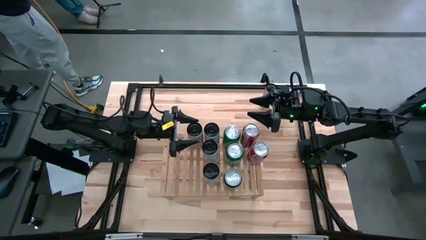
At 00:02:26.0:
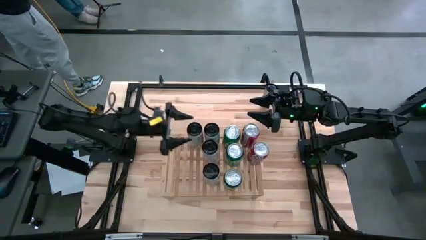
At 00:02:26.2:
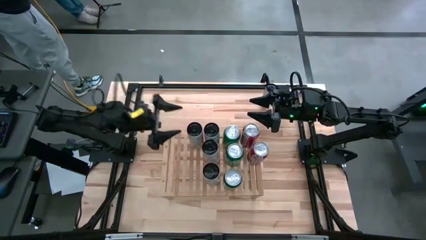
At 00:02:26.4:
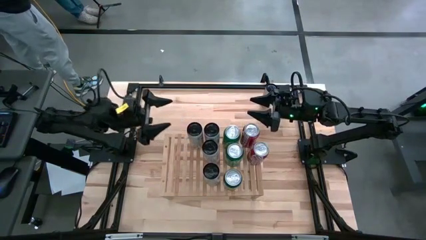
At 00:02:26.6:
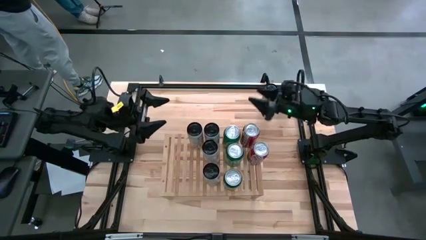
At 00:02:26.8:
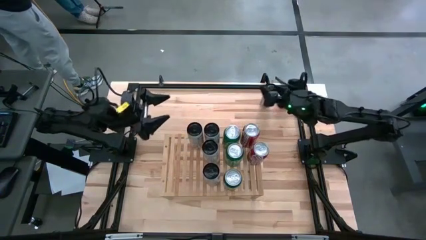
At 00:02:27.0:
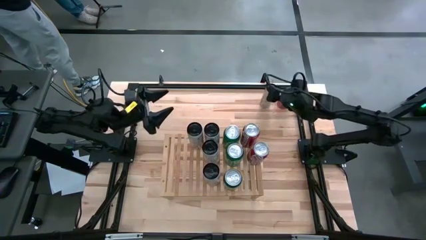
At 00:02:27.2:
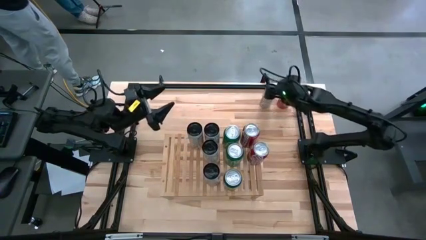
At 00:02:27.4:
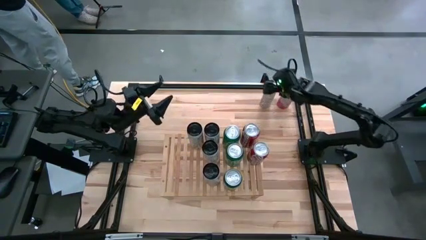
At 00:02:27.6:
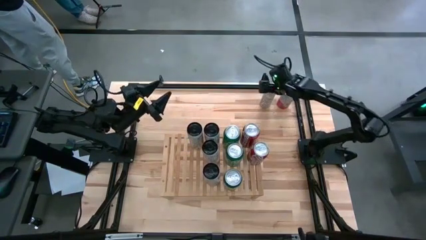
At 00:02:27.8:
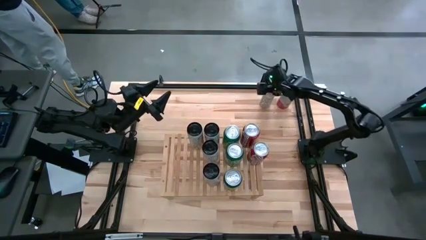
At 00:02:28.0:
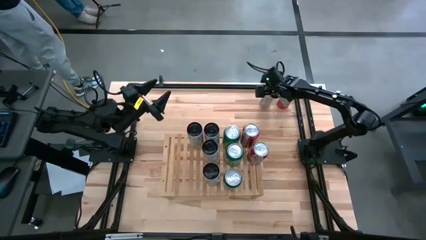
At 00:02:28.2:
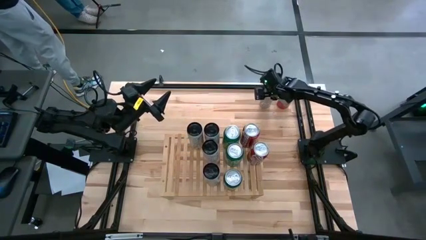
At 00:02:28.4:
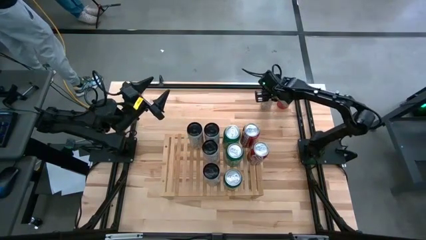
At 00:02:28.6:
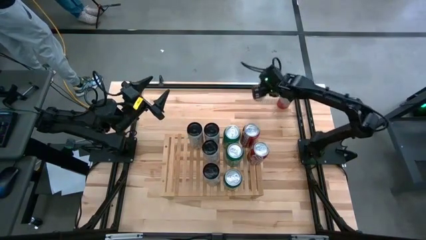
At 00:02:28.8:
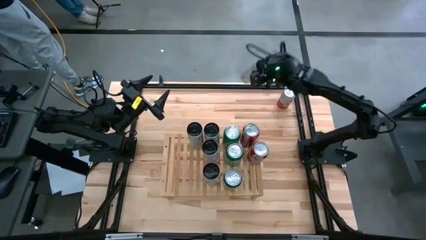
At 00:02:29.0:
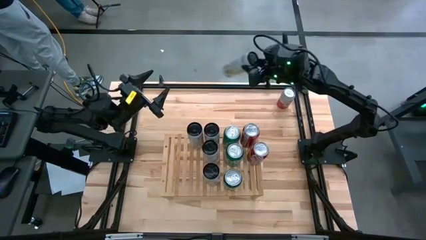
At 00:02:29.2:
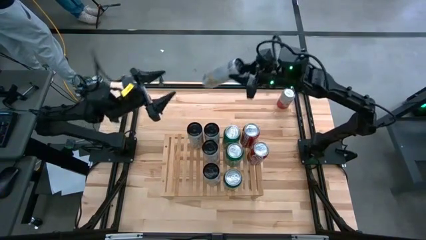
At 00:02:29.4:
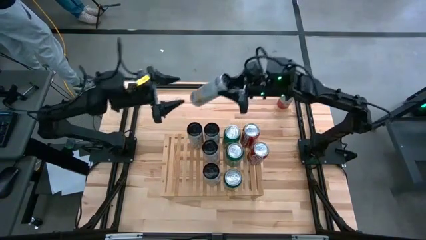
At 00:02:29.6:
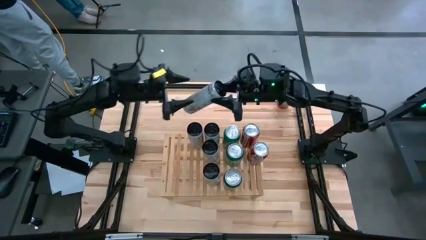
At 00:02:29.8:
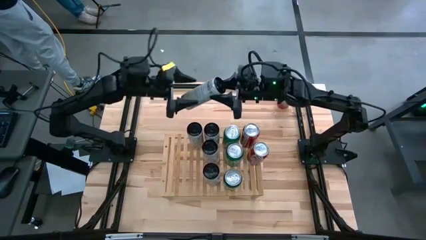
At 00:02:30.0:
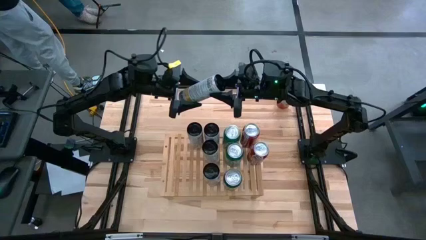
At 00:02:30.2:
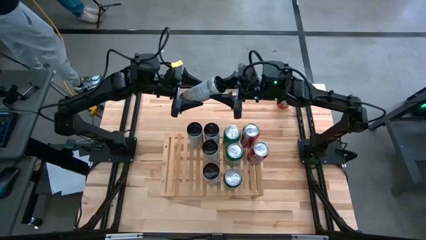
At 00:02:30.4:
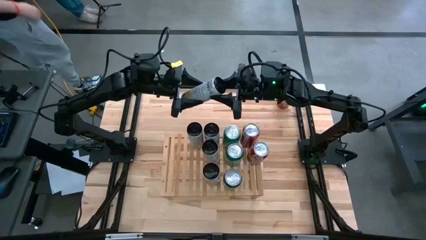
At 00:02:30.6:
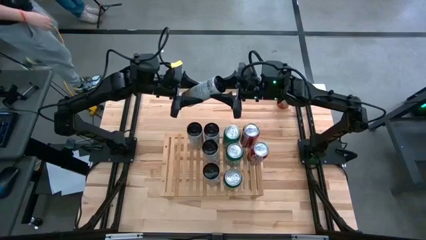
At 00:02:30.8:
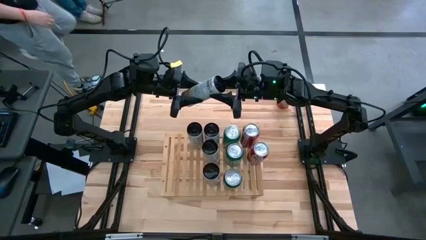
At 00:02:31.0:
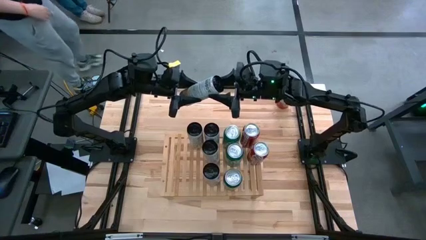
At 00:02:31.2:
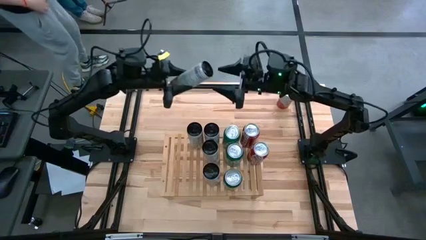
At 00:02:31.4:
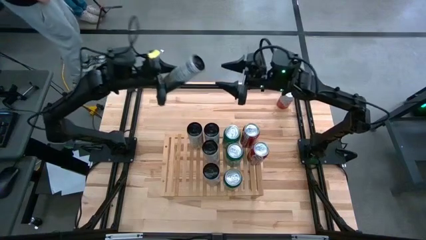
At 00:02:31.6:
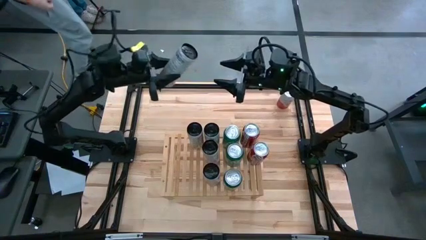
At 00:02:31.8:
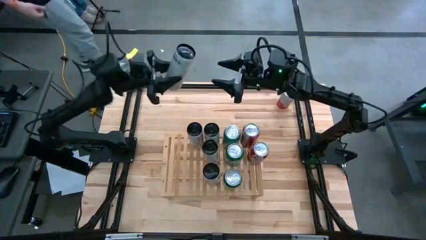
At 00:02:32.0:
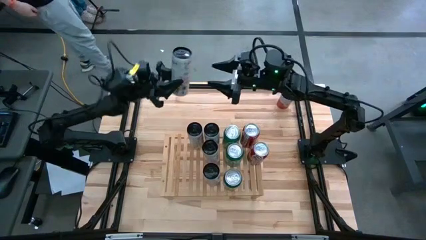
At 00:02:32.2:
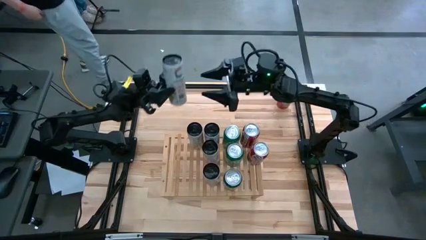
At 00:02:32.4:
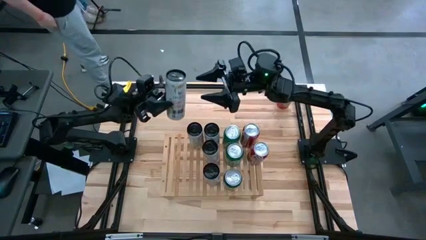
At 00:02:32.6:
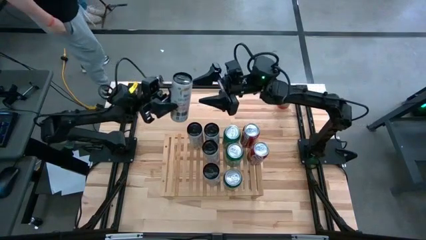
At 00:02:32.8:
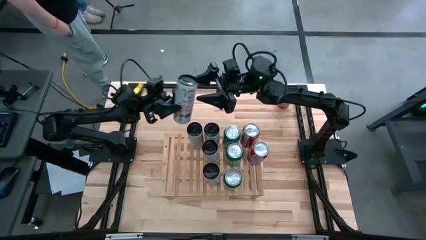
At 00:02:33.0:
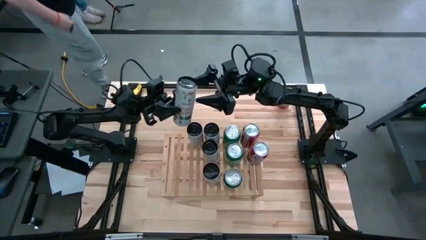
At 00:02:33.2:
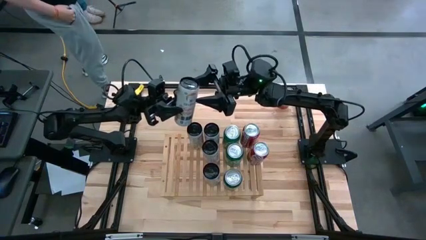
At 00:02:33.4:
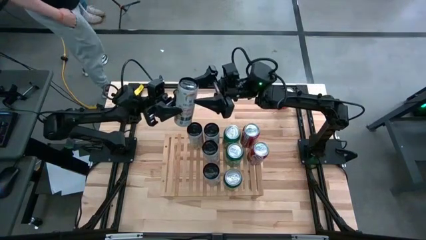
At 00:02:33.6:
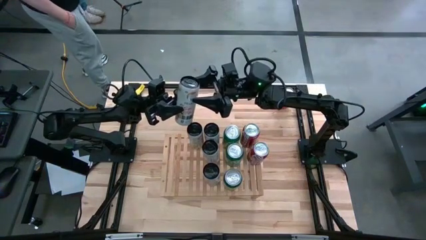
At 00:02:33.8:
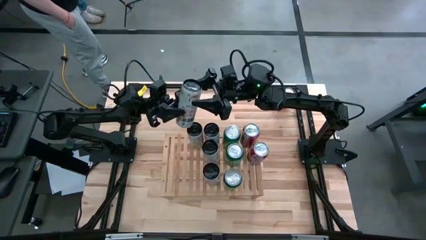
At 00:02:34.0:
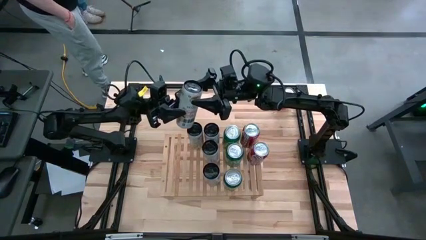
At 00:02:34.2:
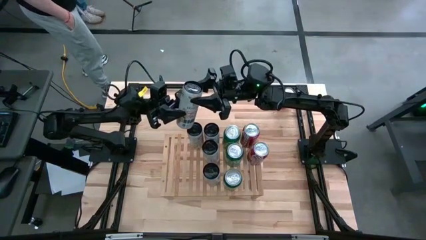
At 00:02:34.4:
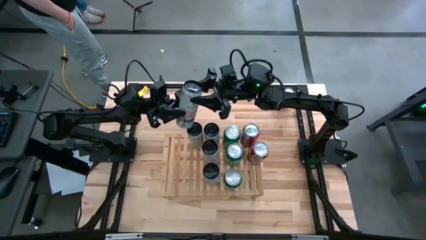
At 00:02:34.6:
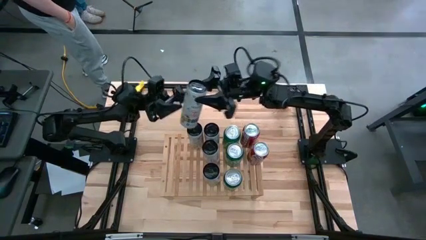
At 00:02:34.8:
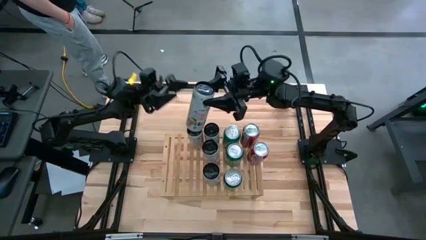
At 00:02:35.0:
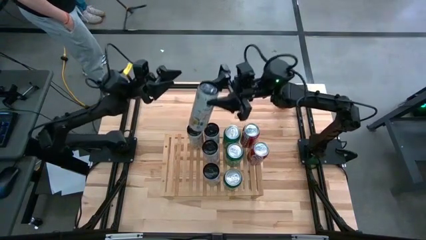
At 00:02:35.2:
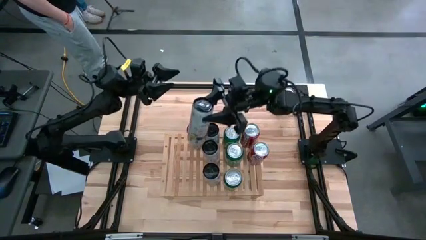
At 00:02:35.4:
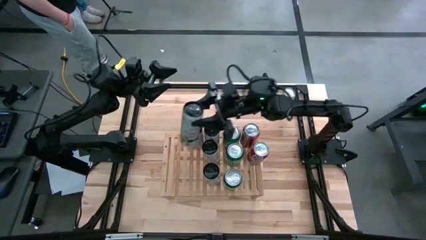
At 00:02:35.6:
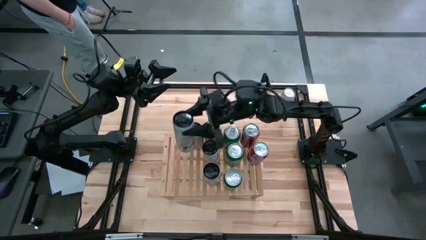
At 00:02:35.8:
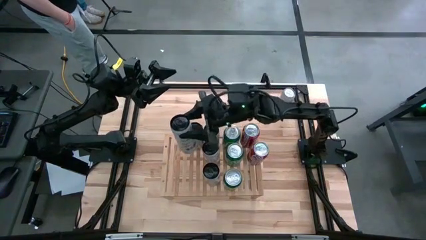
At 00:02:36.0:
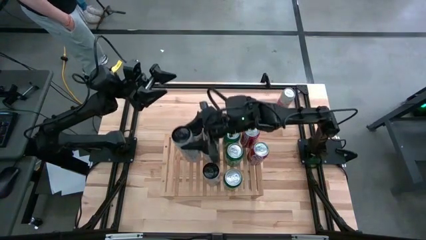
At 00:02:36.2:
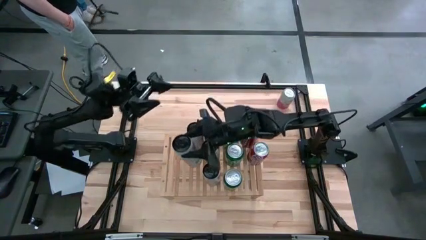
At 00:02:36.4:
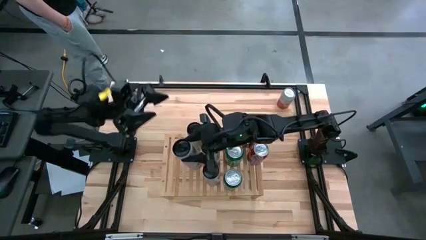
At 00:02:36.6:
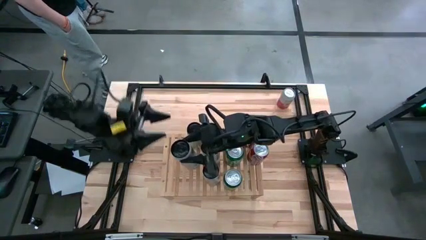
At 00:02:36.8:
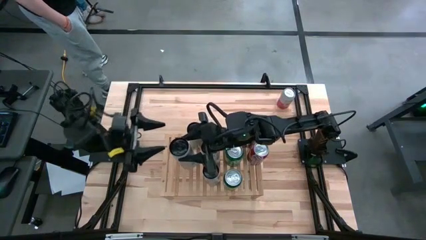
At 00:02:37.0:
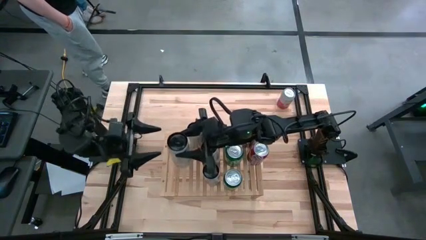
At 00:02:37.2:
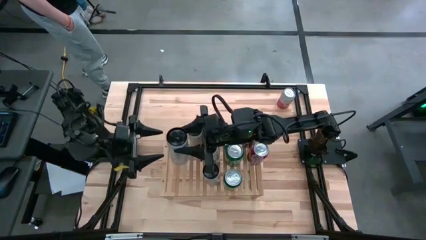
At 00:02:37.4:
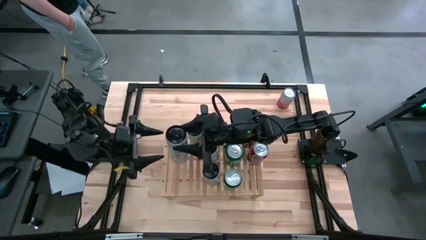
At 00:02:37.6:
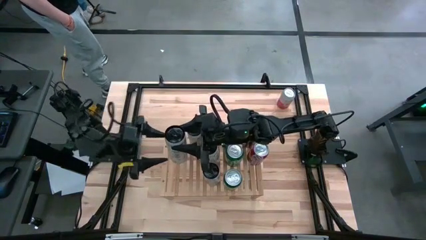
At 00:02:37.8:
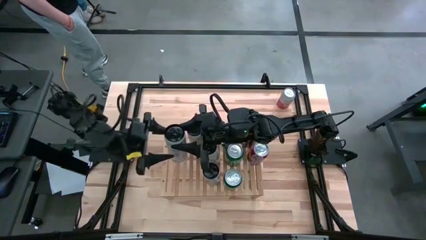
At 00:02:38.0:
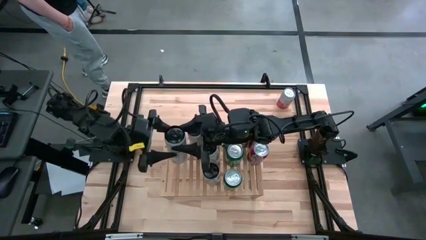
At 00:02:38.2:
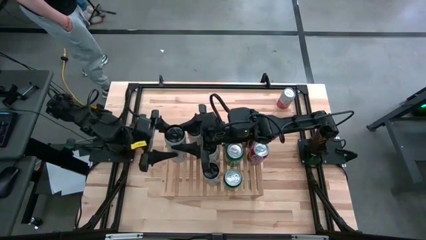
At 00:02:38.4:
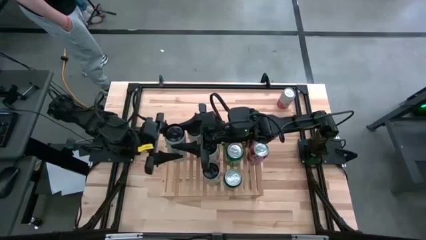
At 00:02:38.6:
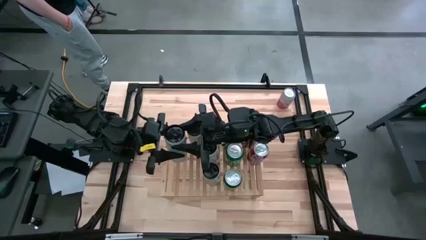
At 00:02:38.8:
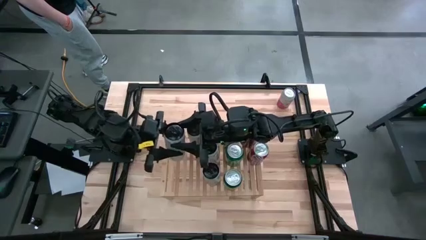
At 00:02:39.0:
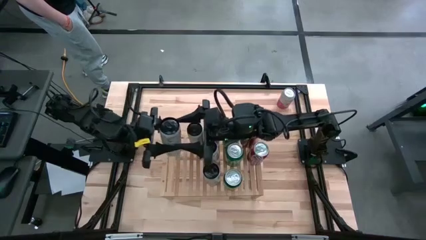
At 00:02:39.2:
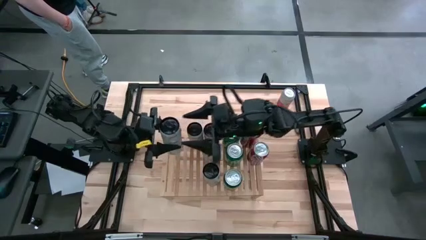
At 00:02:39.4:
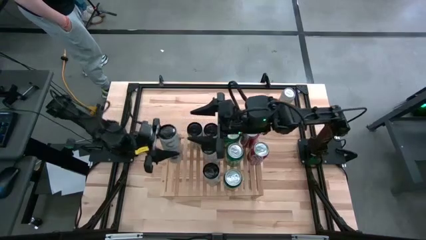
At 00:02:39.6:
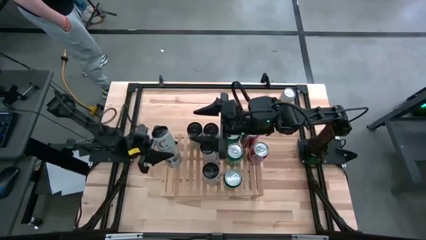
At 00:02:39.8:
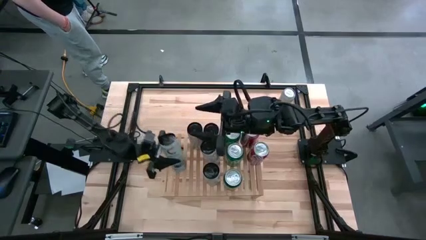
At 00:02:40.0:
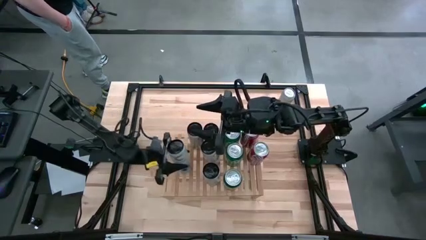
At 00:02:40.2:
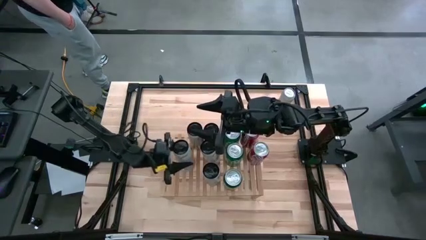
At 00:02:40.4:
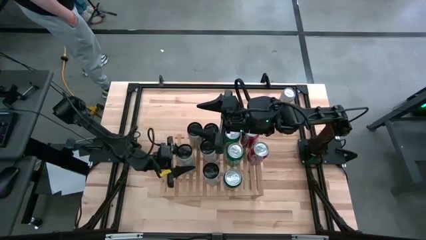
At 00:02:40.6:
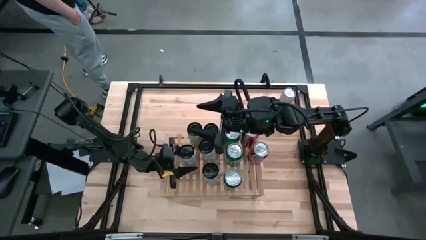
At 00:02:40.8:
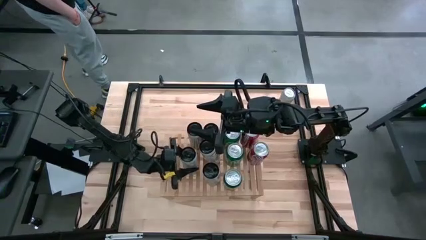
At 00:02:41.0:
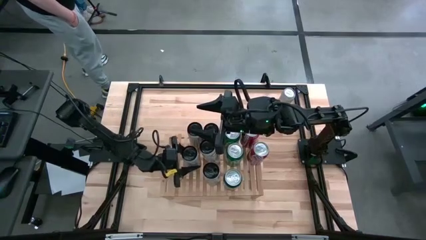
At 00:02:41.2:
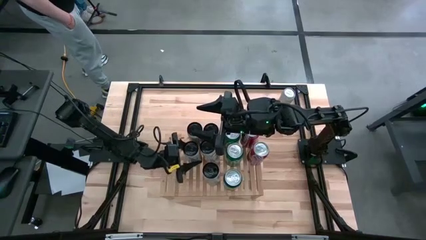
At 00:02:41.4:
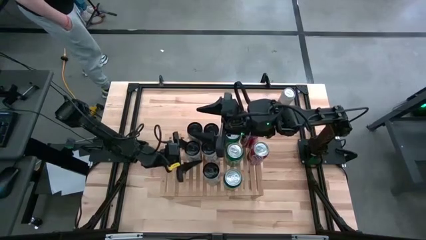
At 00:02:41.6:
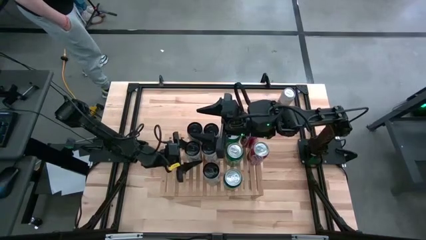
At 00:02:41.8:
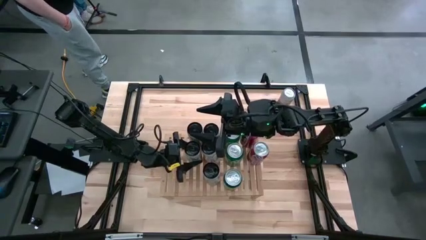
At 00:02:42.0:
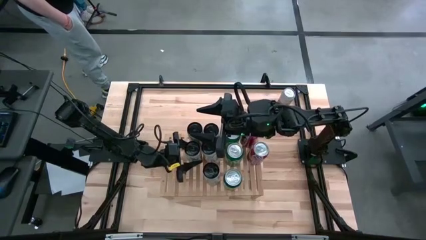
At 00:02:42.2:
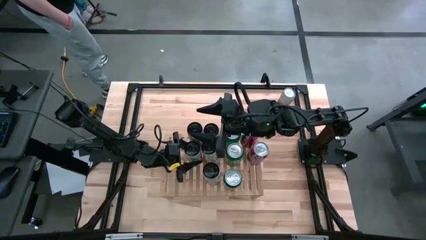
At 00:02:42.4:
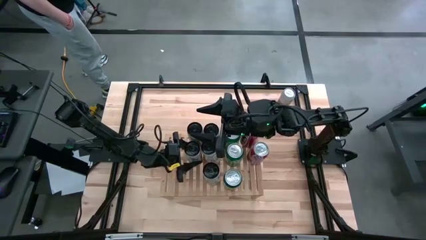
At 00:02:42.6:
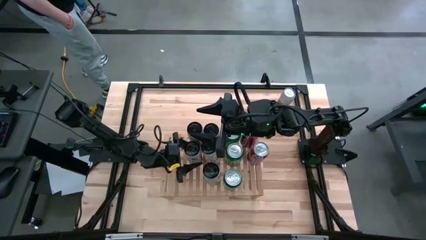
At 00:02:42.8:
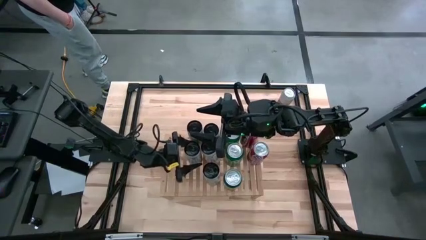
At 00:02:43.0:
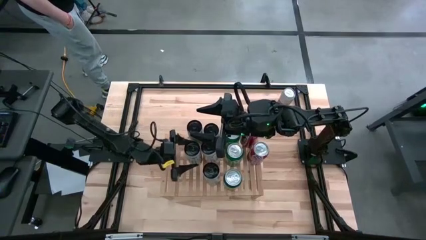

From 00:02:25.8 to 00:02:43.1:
Task: Place canned beverage on shelf
Put the white-yellow soda can on the shelf and aligned with the other white-yellow soda can
